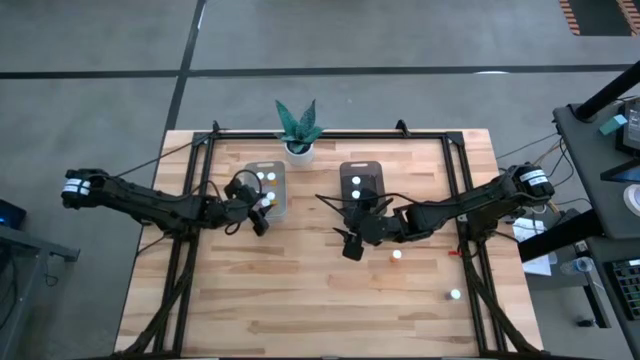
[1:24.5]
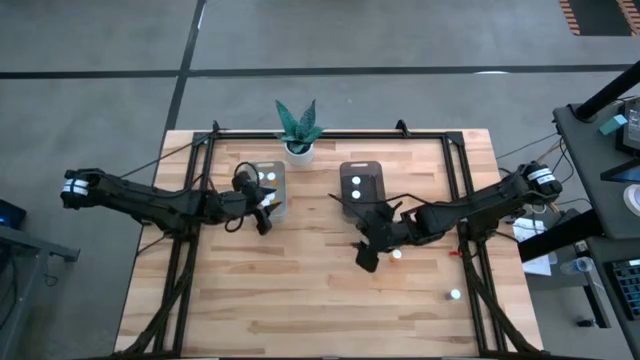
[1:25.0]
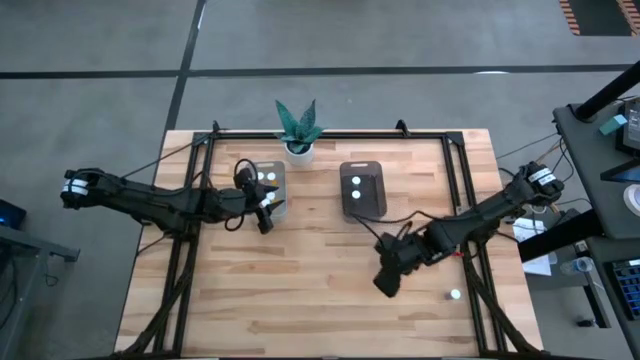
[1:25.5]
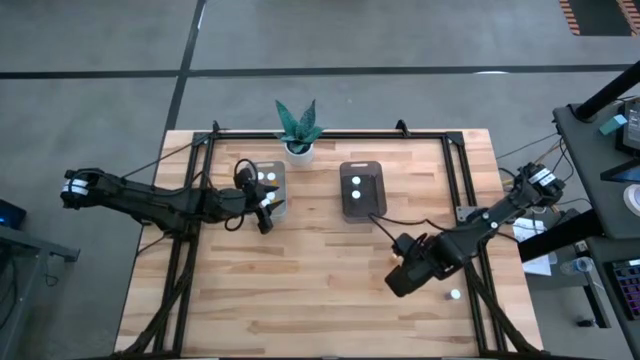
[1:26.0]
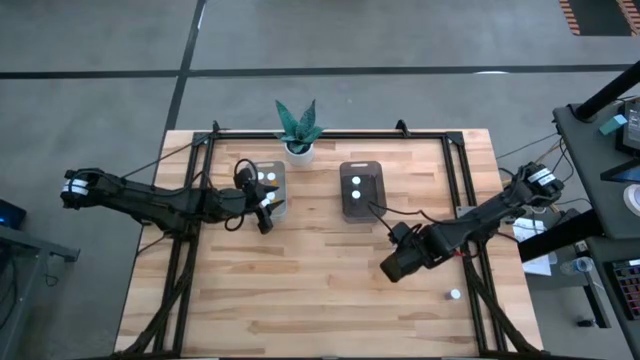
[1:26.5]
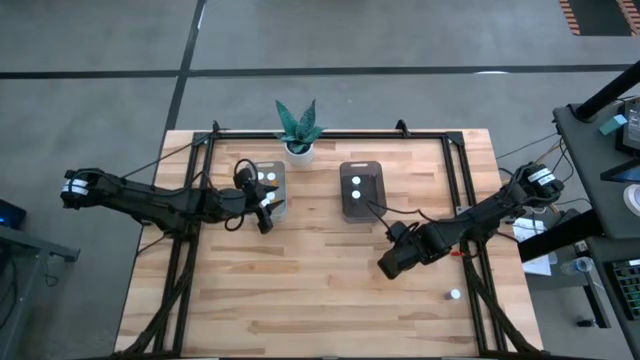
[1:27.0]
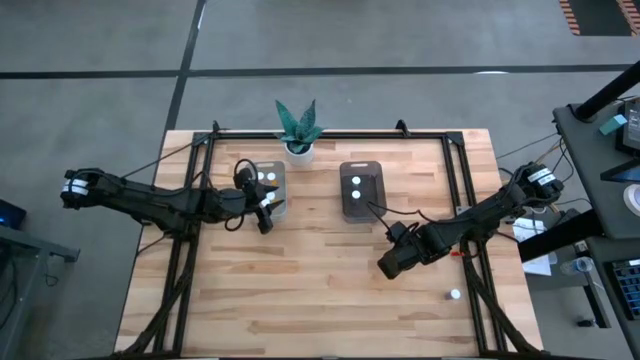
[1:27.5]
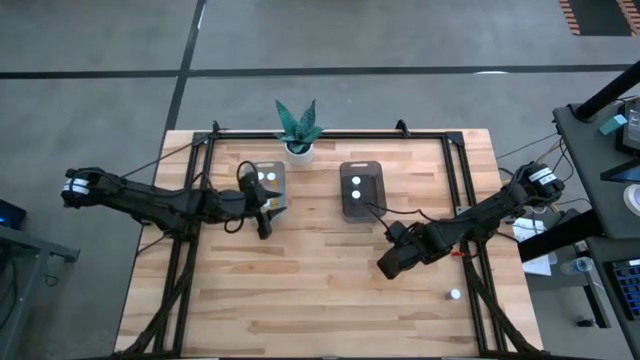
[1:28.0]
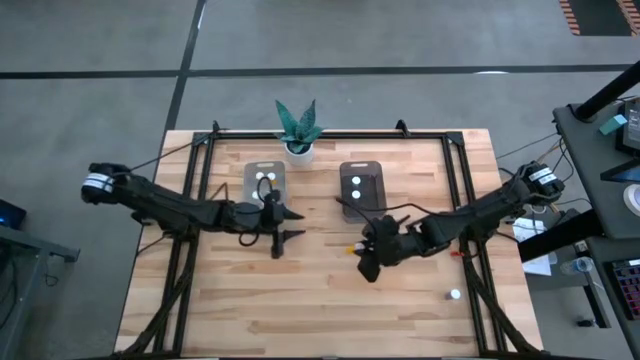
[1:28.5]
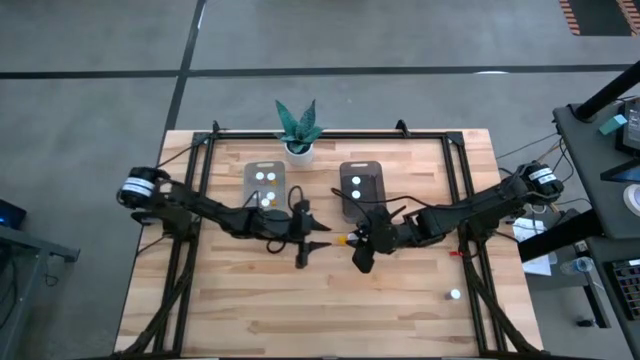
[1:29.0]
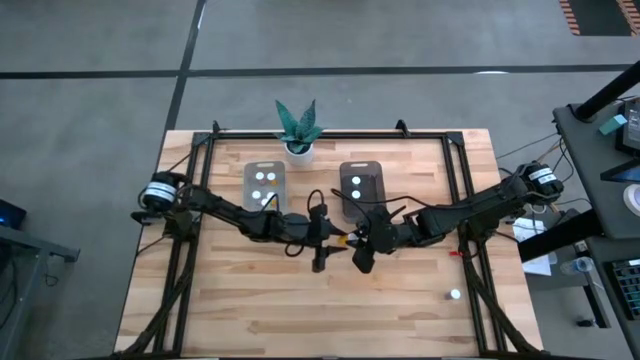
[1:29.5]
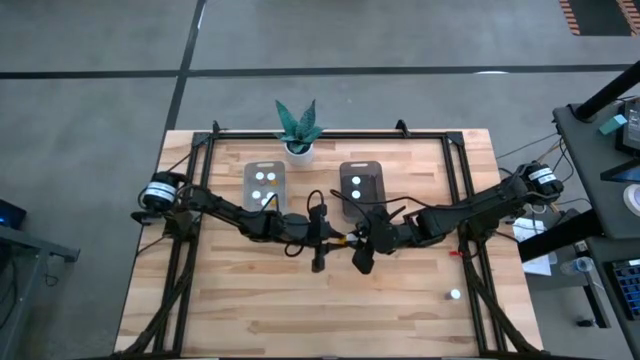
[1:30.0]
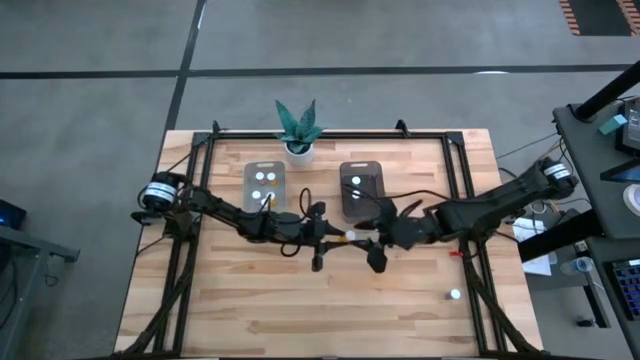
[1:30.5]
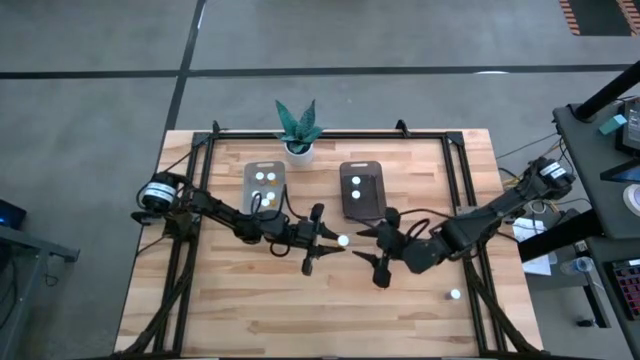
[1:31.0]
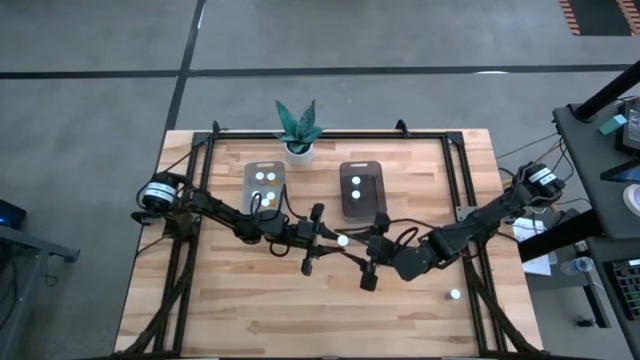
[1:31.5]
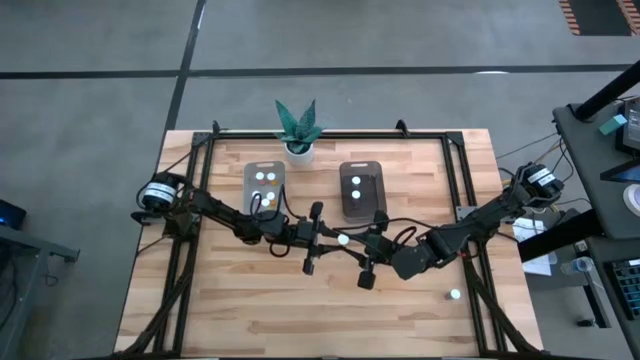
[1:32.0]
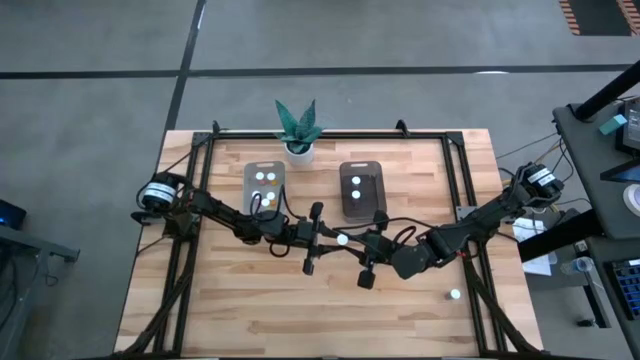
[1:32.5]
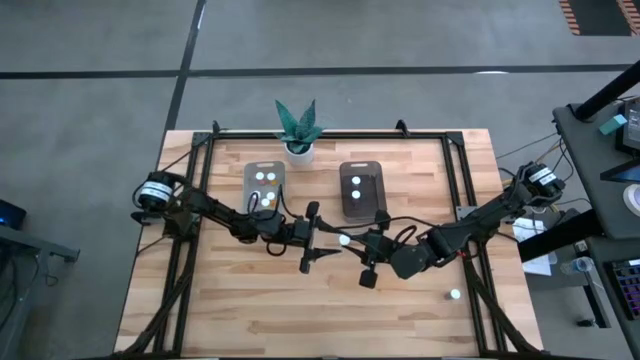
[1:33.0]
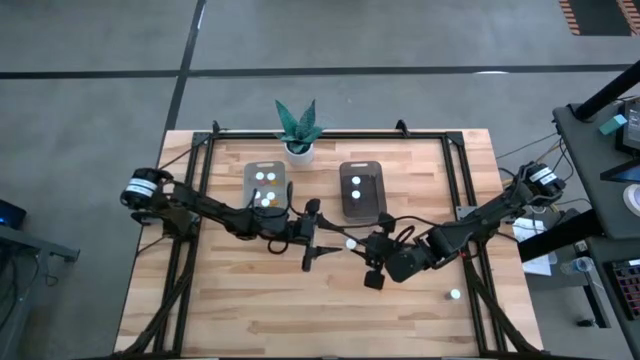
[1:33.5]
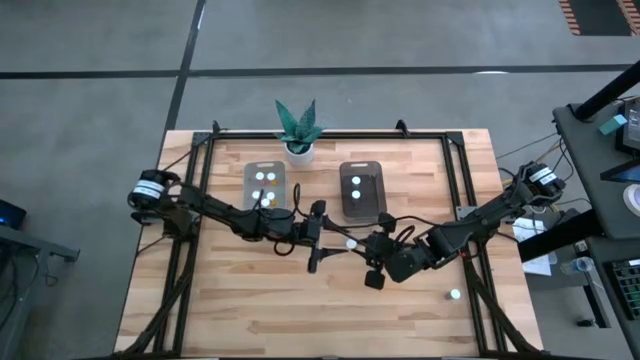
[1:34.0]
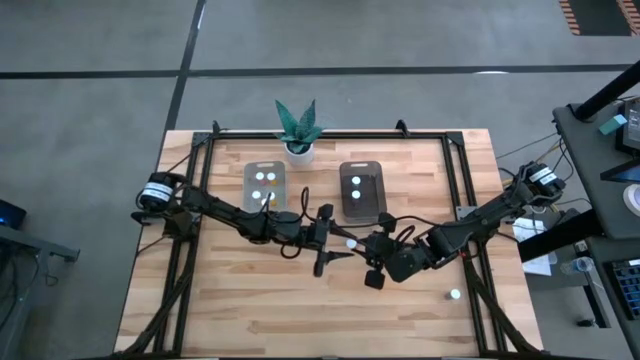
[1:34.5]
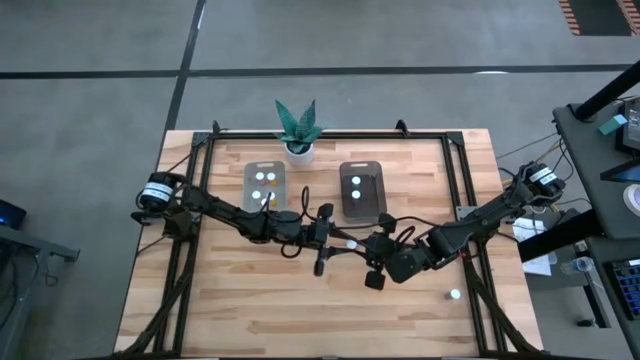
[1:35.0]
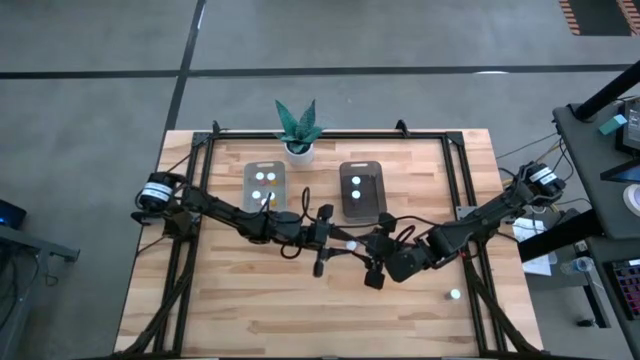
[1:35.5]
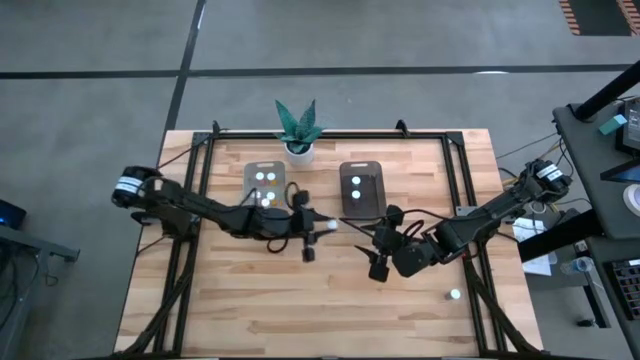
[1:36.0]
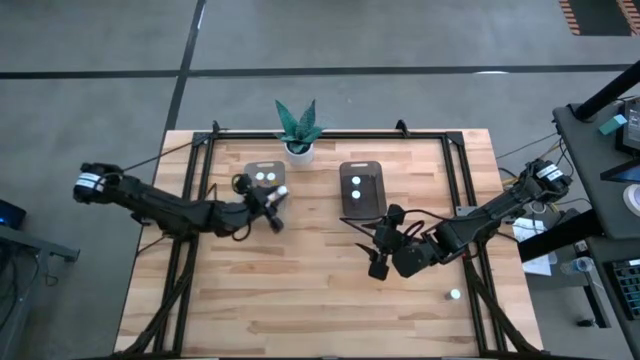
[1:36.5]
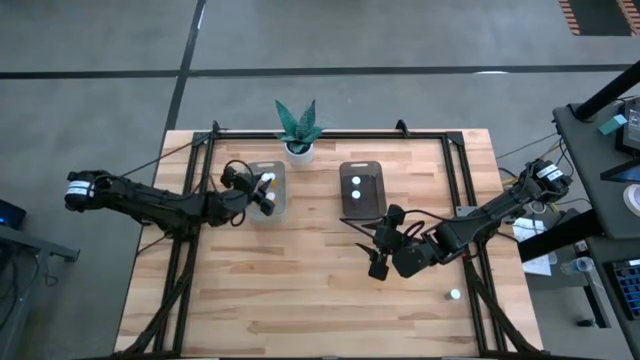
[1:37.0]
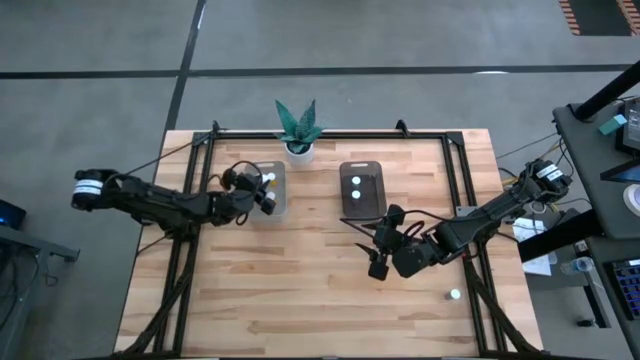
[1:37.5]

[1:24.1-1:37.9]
Task: Pick and place medicine bottles into bin by pill shape (circle, oval)
Put the orange tablet bottle into the gray bin

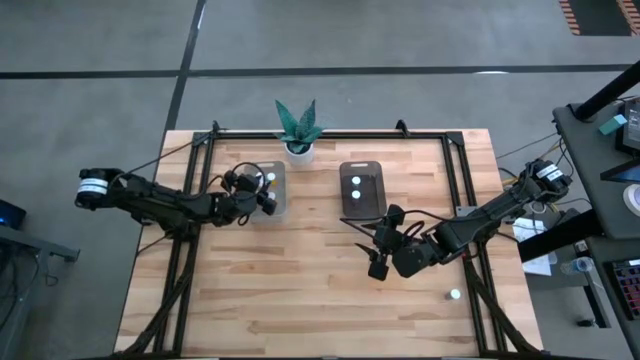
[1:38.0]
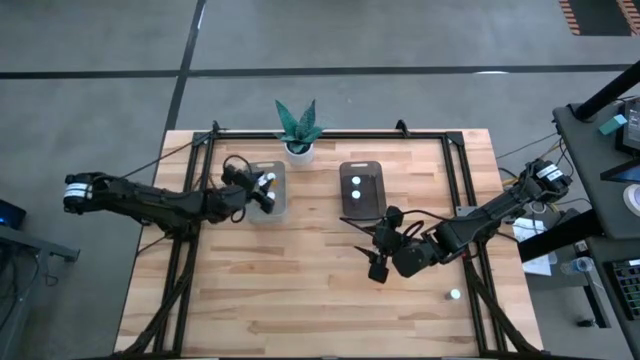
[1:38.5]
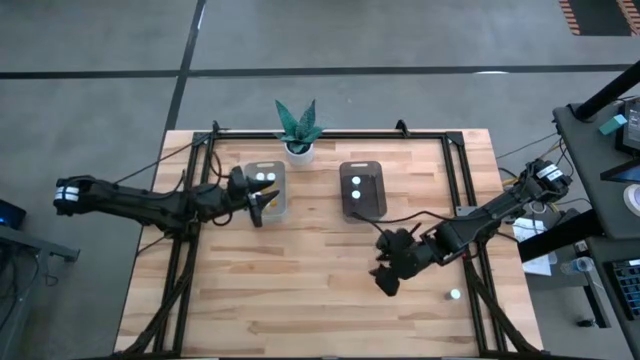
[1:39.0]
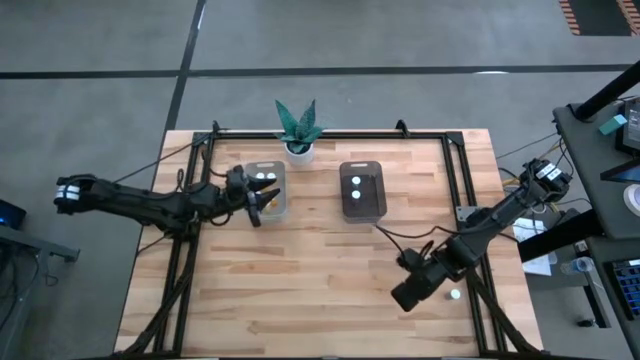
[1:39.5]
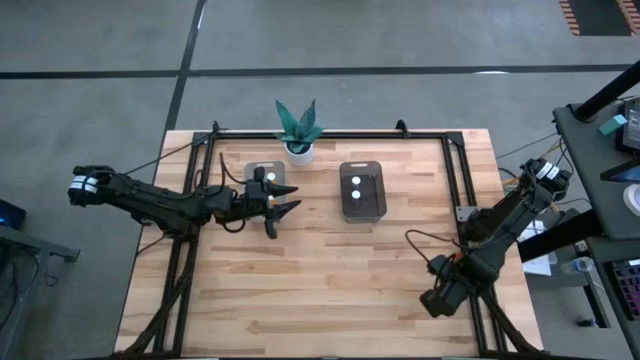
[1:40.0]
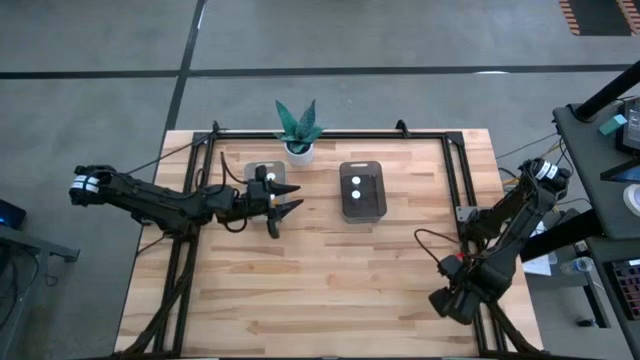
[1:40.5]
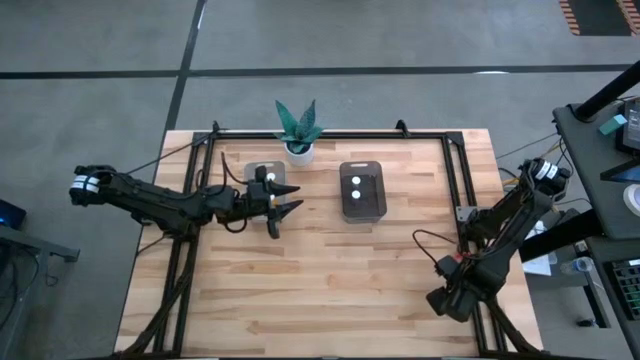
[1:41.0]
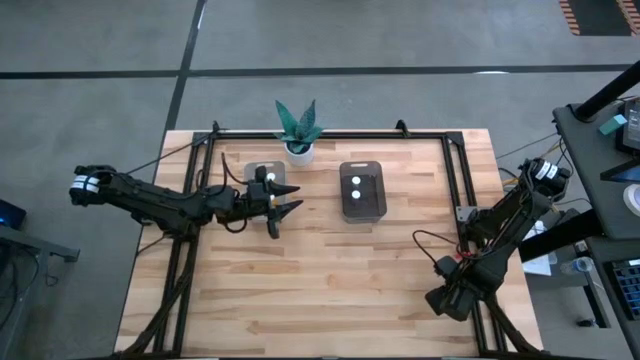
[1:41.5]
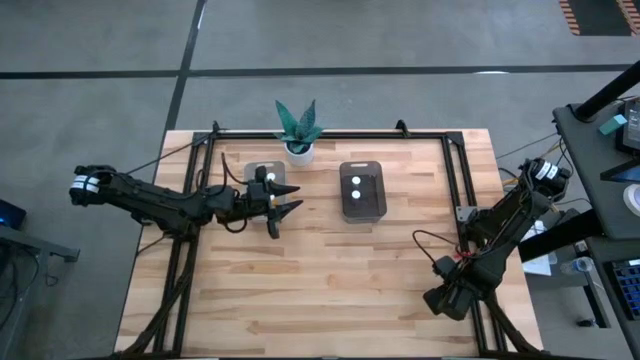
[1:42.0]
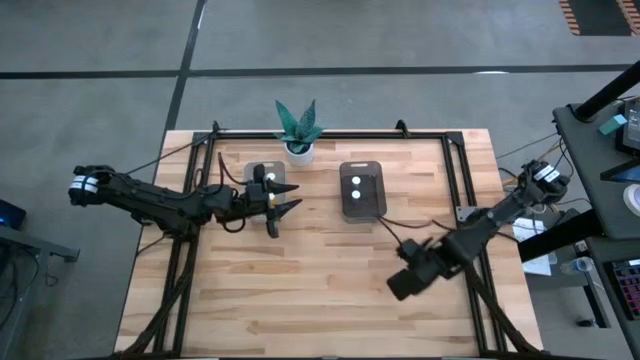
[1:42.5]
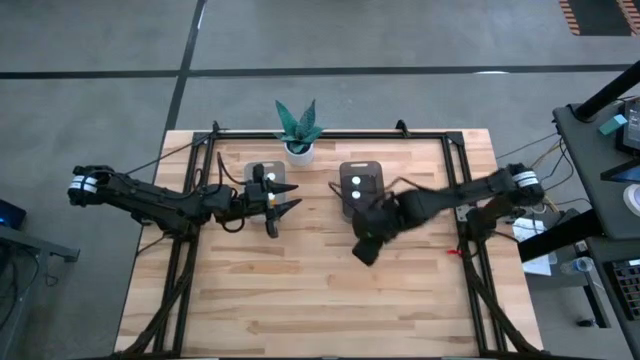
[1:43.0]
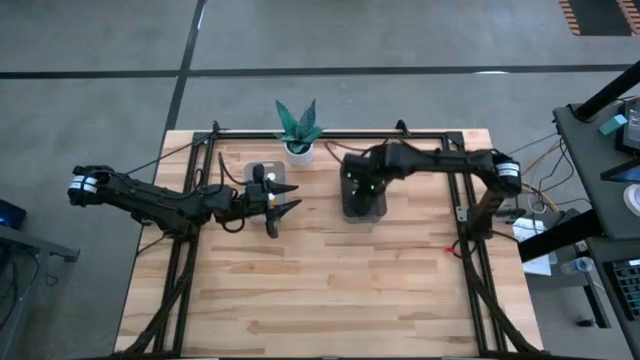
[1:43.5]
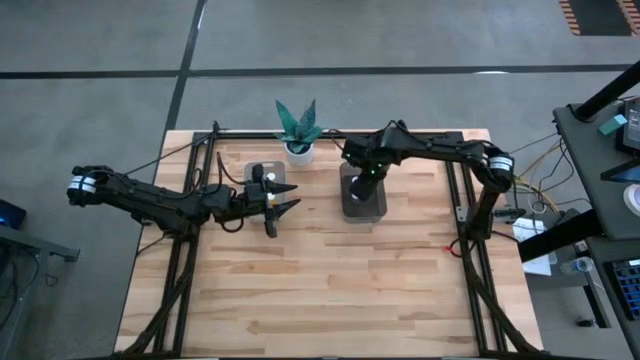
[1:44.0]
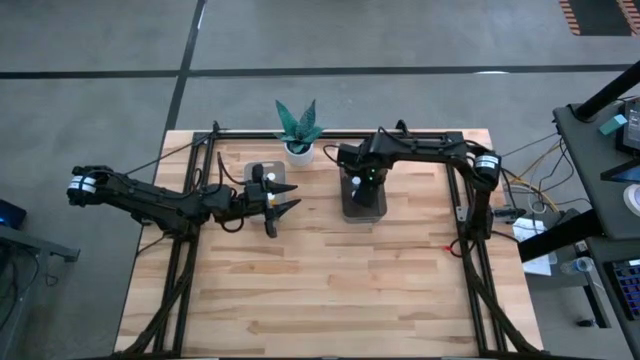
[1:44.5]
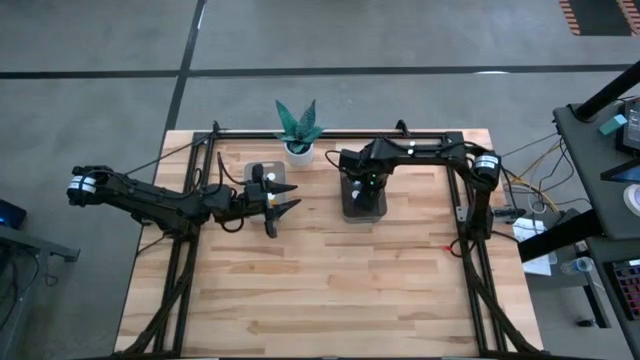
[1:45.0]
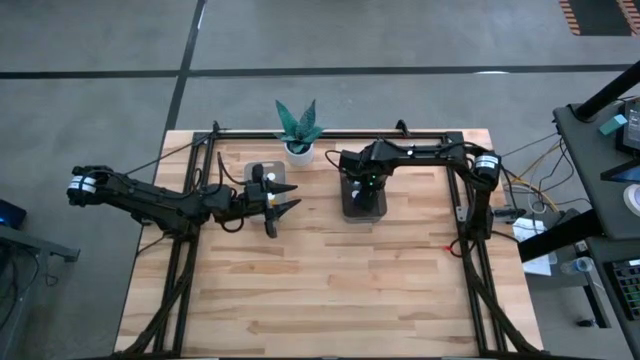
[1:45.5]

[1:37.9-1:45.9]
Put the blue capsule bottle into the black bin

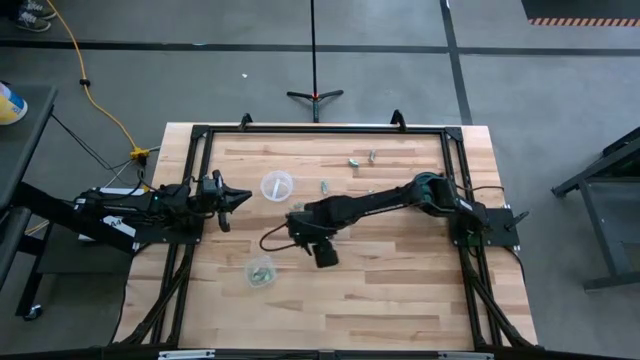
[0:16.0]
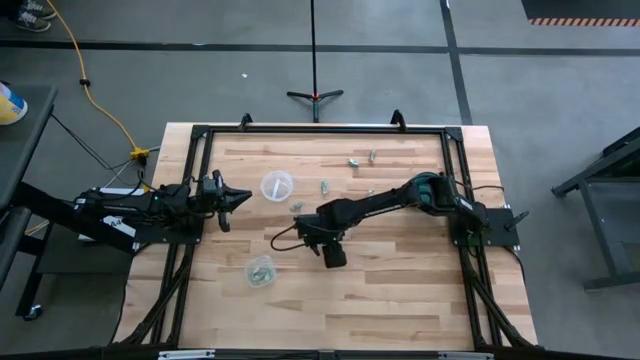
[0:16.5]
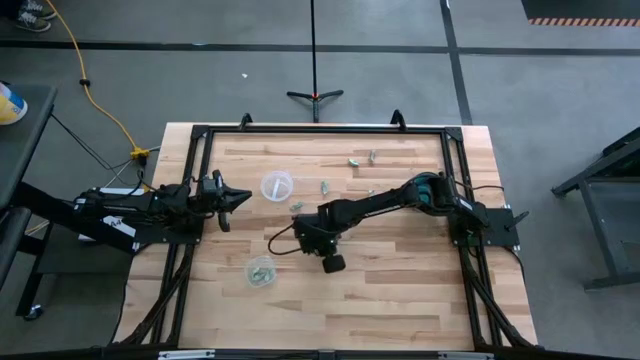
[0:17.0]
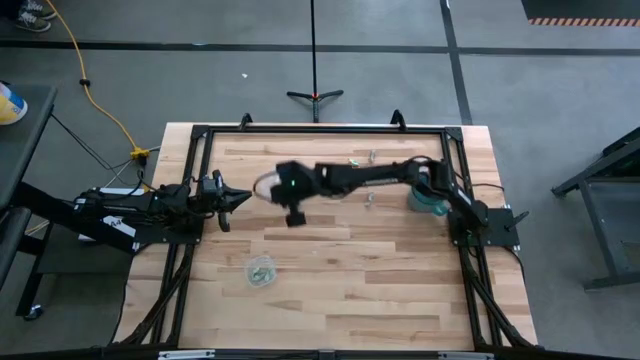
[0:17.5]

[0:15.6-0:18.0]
Task: Pick and place items into bin
Put the white stevia packet into the top transparent bin
